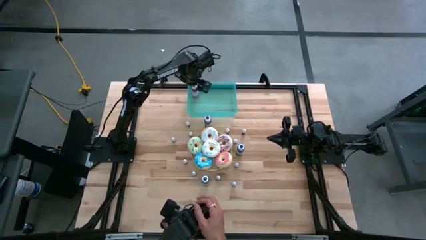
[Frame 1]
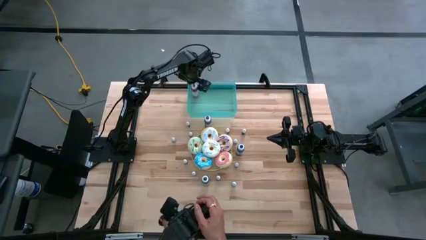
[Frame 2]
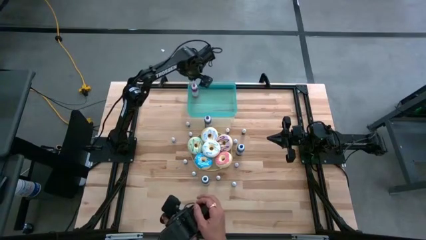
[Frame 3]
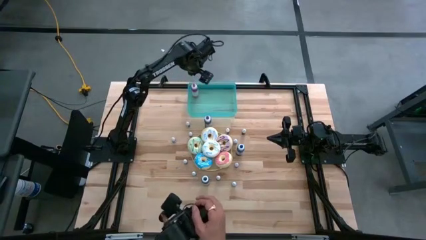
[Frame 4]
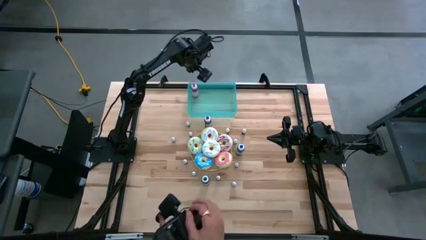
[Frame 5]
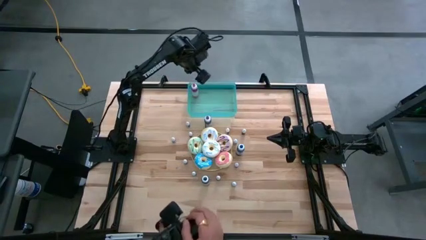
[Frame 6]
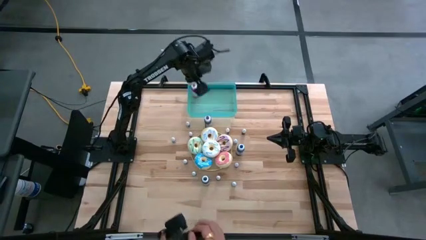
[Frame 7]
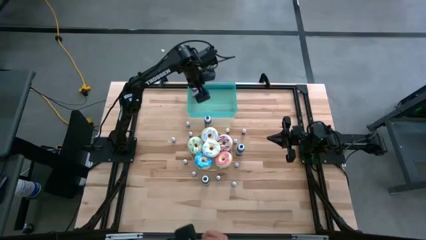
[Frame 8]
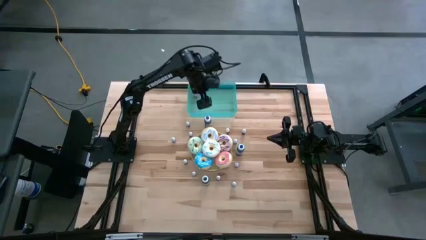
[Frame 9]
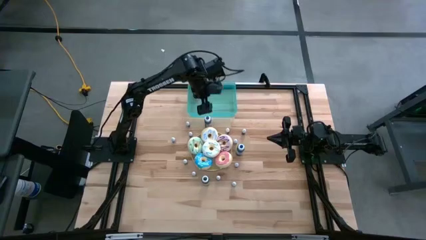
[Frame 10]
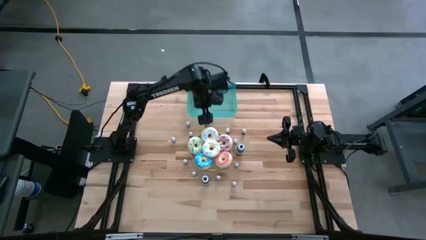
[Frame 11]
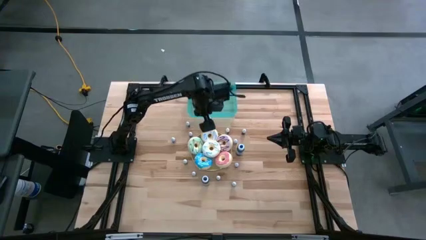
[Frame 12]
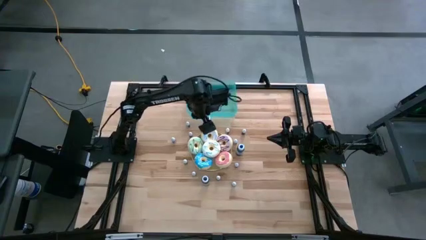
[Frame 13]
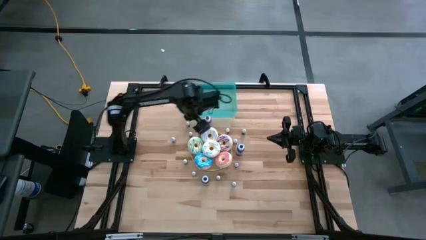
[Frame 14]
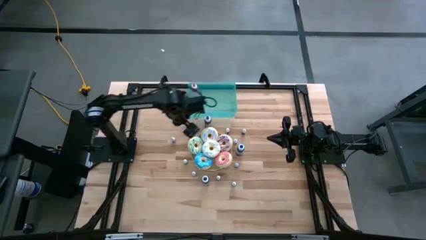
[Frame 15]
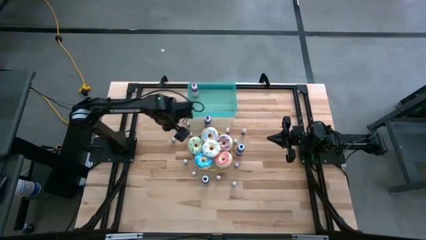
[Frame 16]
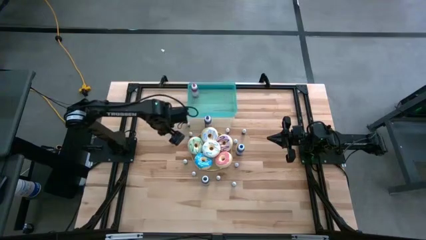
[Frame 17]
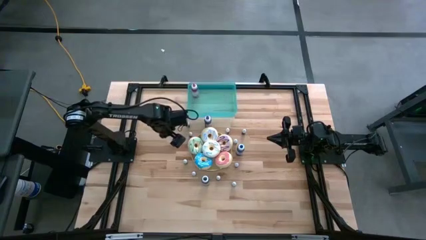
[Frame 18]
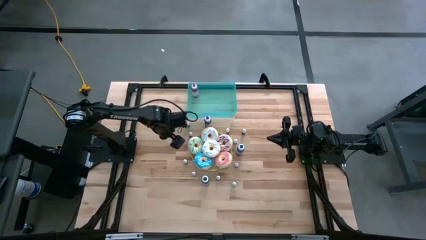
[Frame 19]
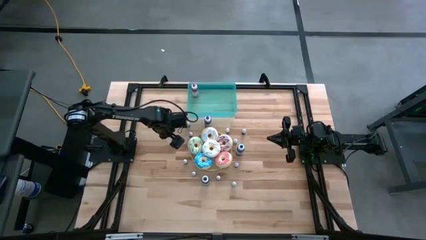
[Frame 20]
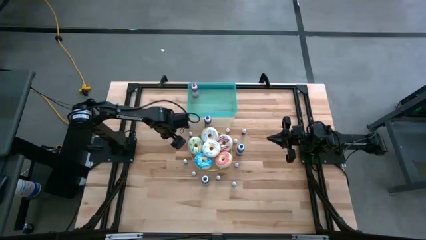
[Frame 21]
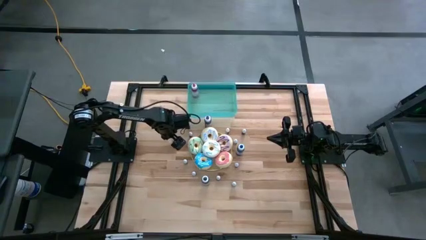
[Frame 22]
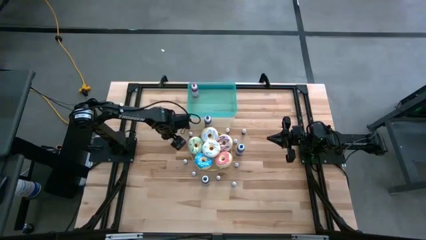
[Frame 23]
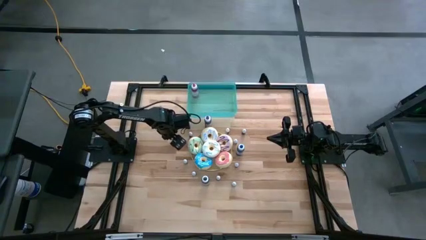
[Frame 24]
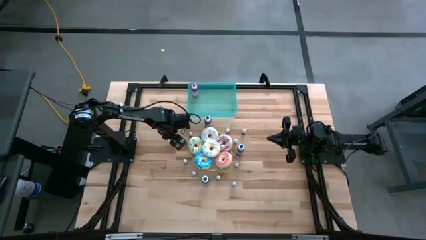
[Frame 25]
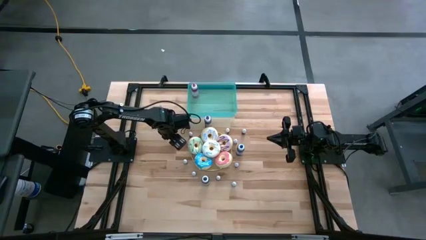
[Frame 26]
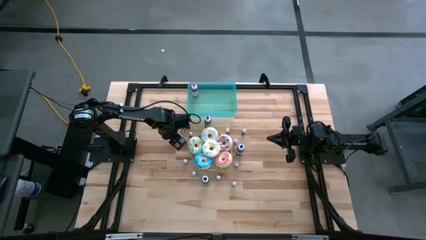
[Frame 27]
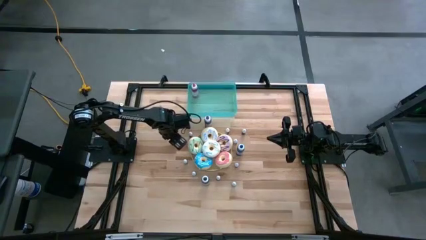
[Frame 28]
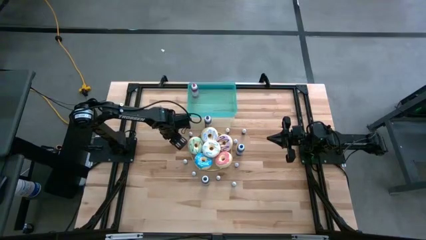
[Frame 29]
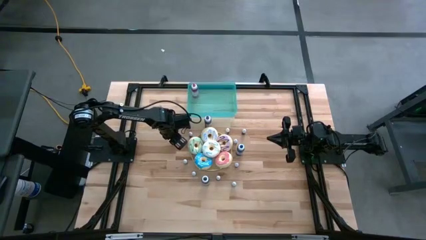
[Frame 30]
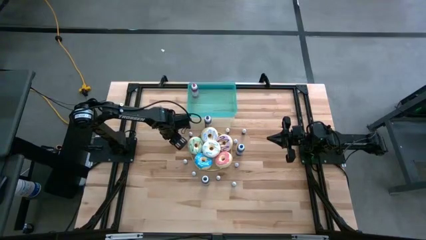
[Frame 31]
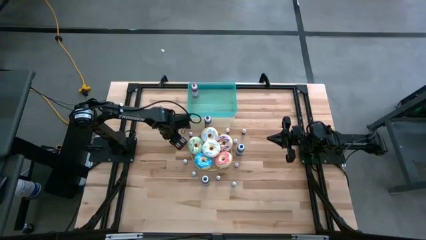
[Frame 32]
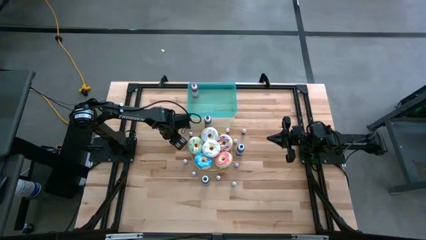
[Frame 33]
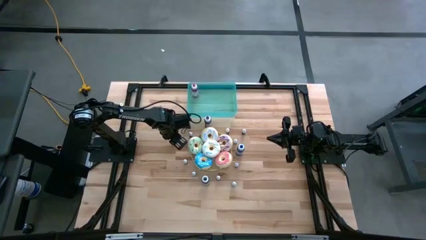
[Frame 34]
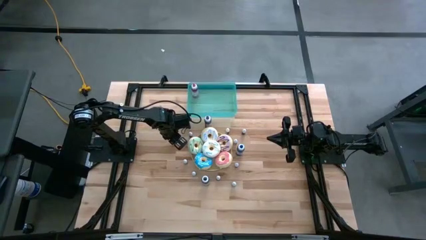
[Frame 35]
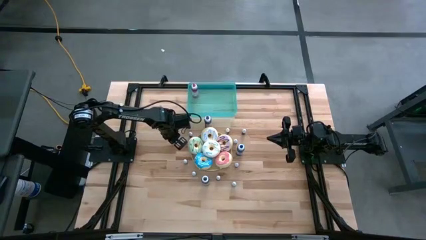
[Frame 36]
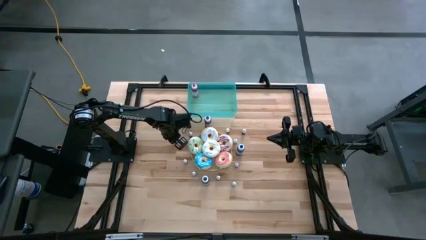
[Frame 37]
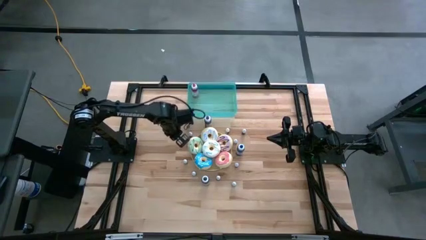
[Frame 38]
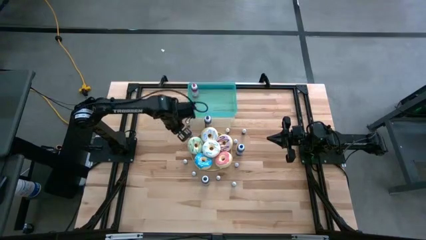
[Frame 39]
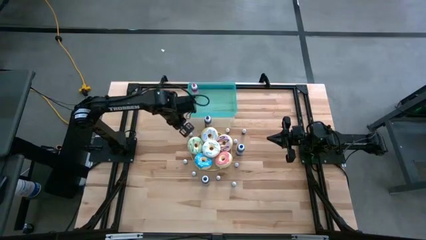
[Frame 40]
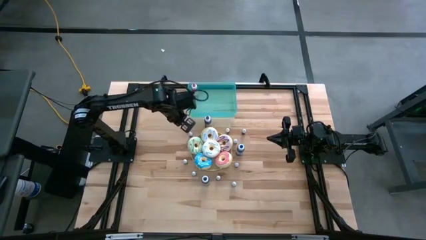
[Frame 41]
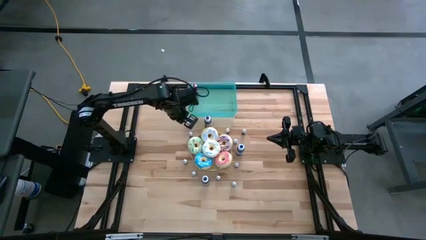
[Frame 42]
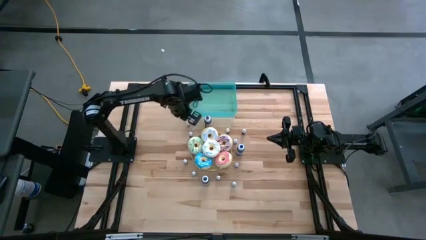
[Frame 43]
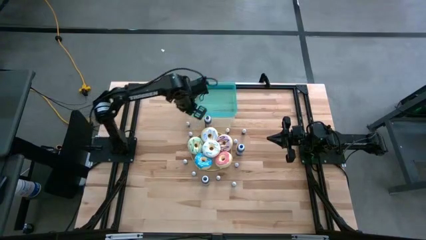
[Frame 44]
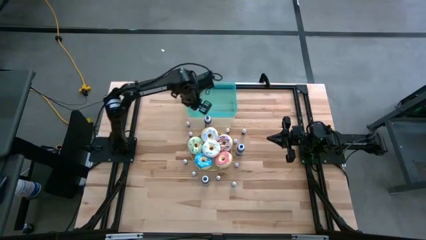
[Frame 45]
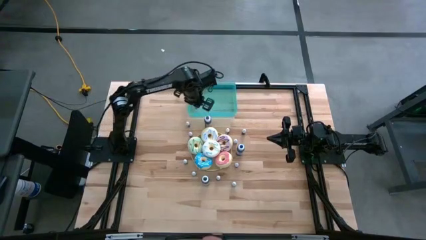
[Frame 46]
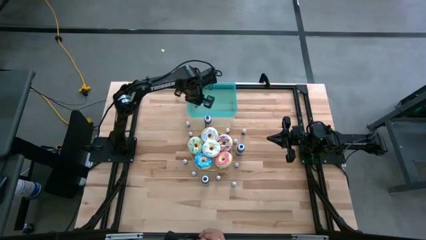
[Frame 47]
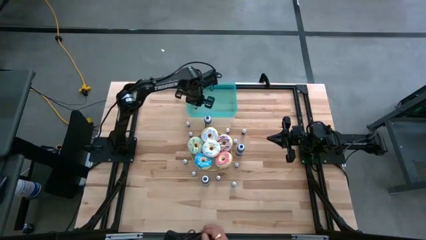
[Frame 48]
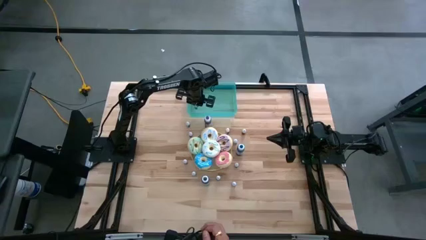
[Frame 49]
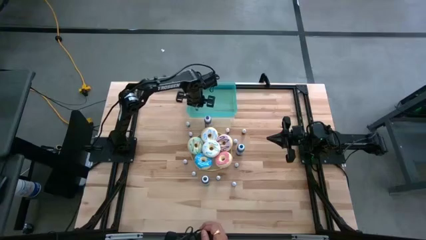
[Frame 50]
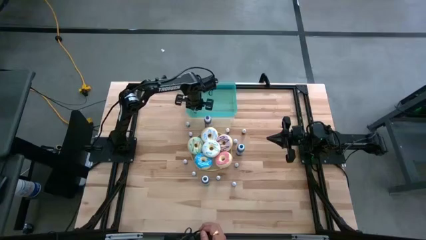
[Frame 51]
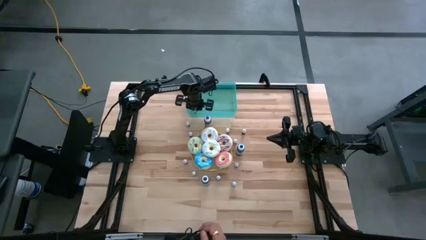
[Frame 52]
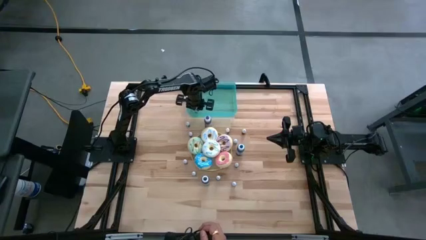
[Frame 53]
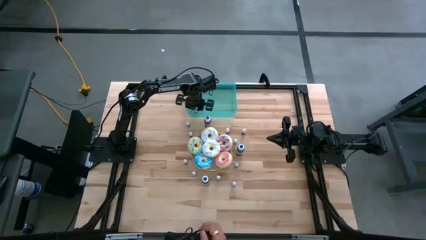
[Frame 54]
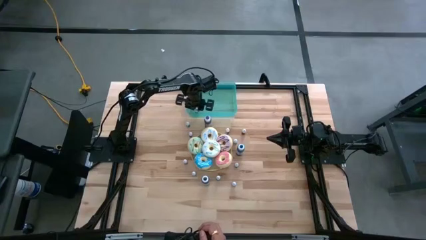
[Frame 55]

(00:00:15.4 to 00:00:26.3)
Task: Pick & Place food coloring
Put the small blue food coloring bottle into the green container
